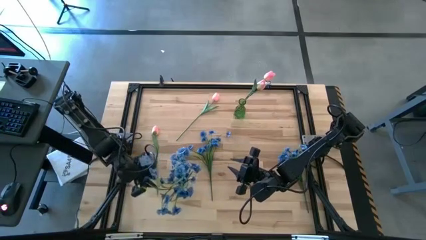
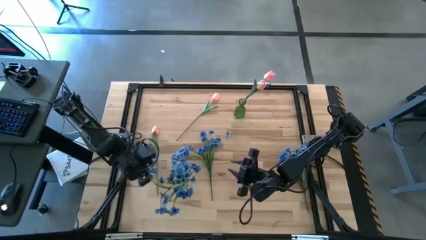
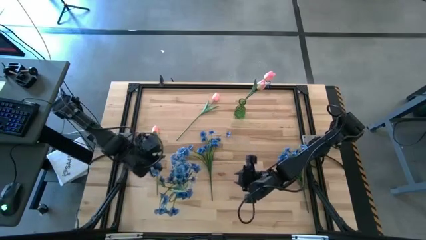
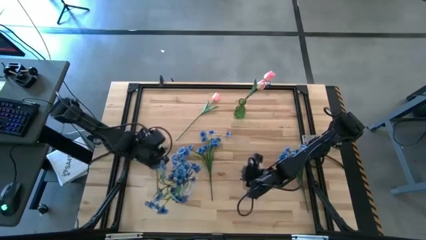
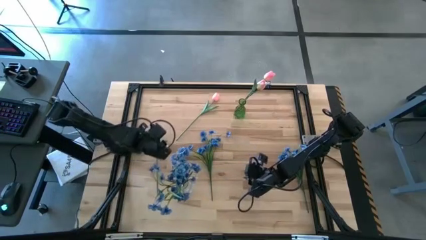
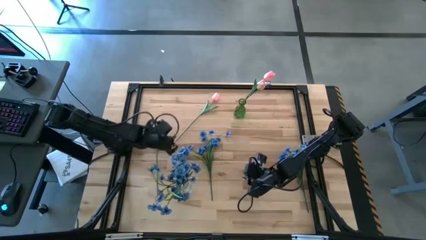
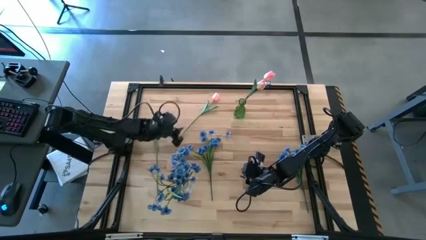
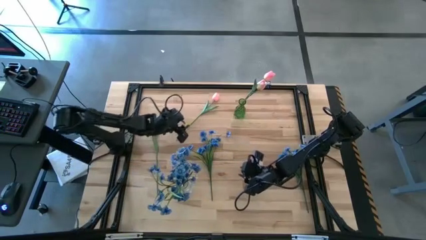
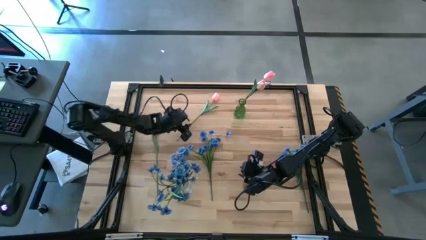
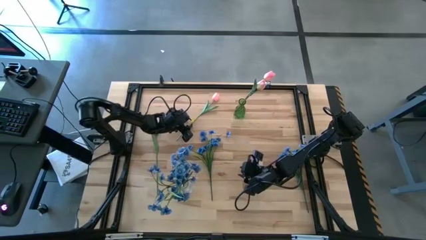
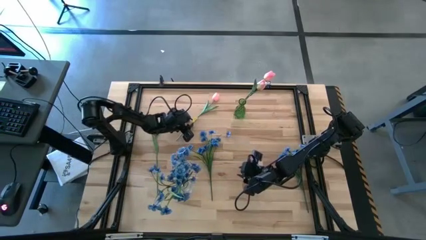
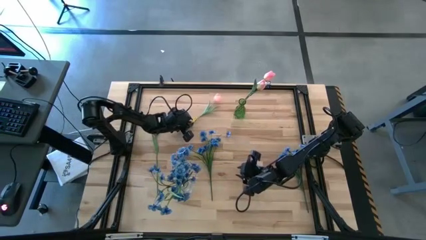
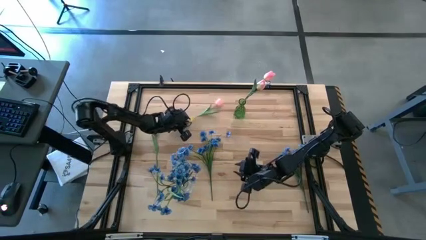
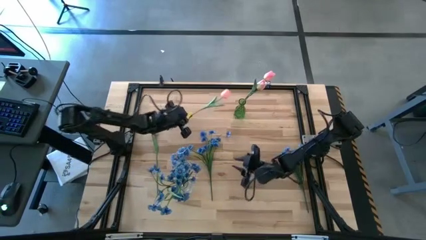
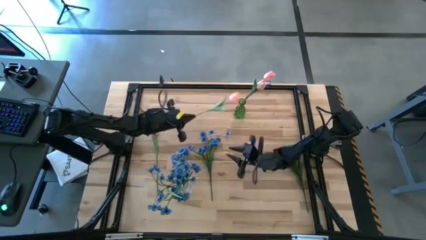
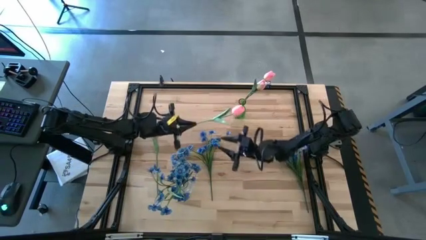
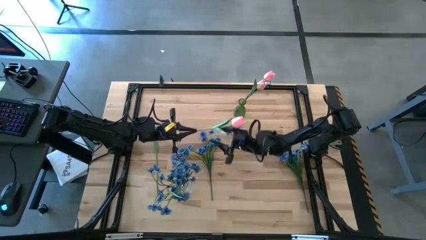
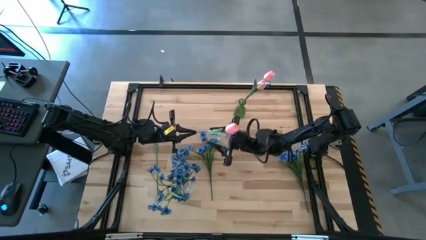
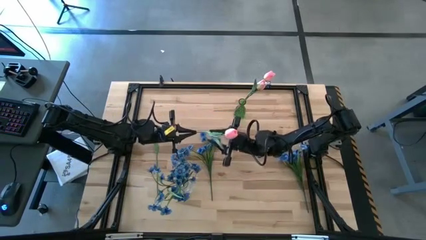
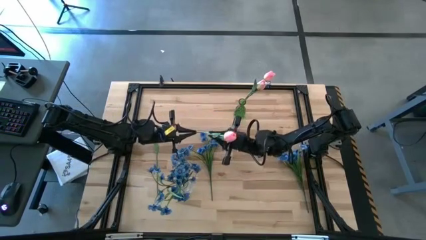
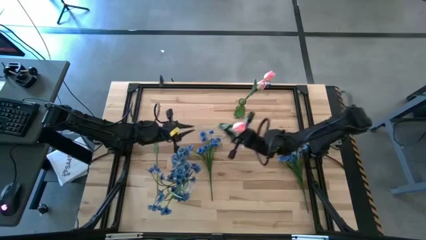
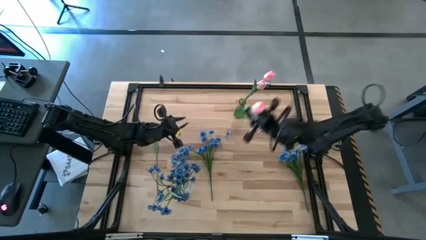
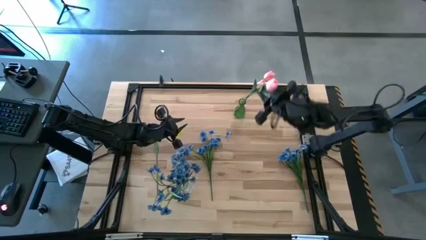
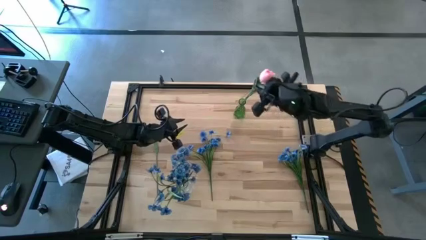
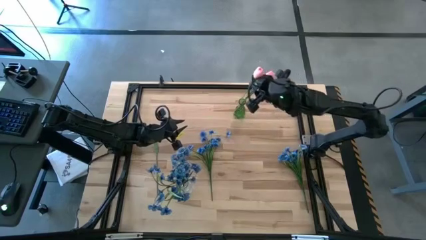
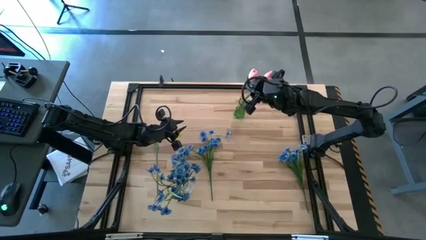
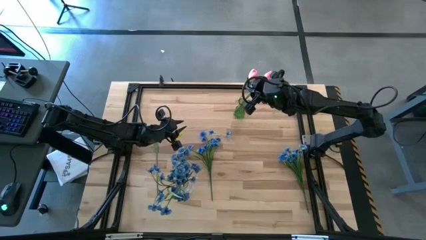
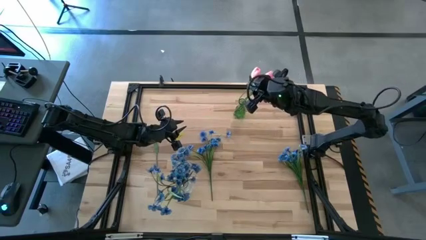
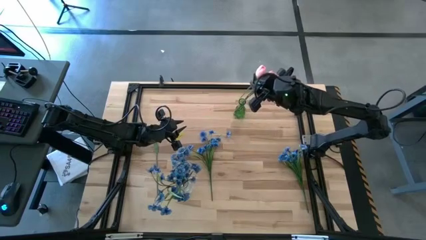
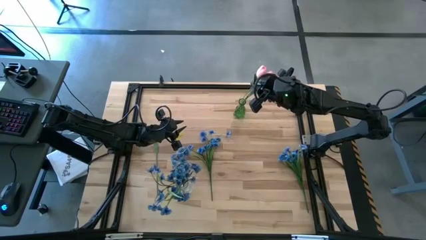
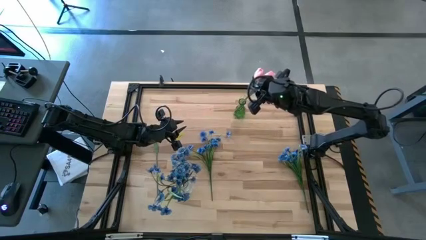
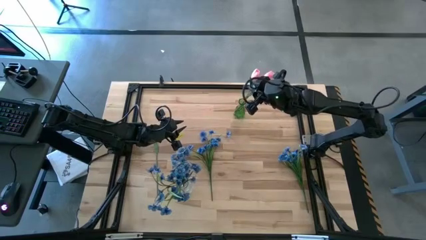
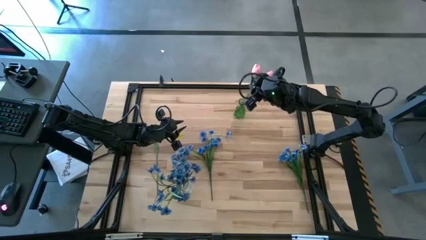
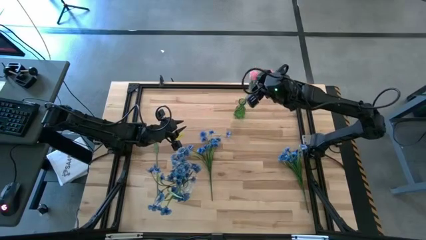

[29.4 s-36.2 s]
Task: Sort flowers into vase by color
Put the pink flower into the green vase

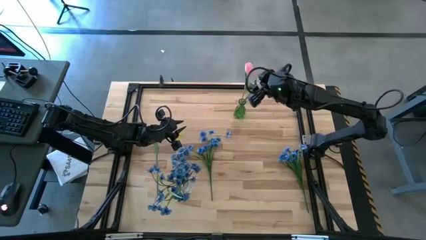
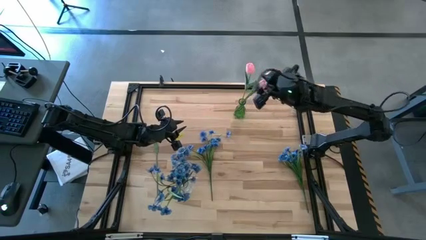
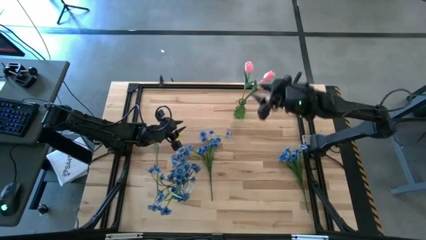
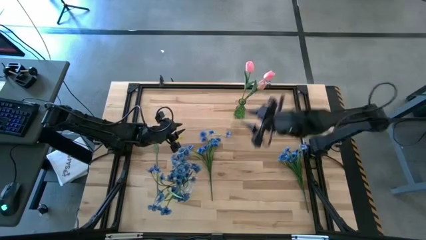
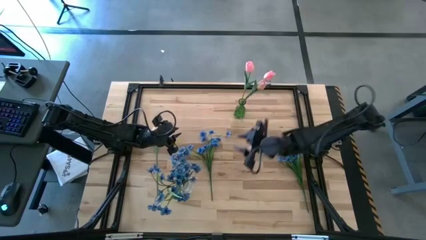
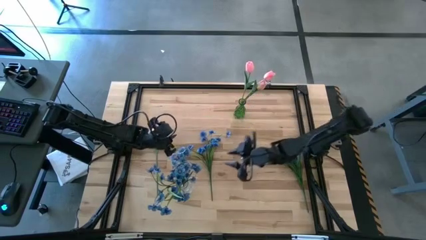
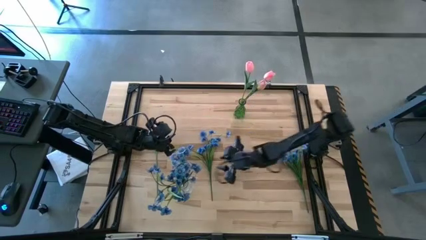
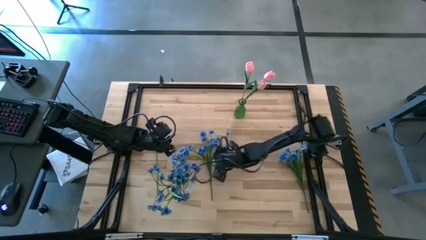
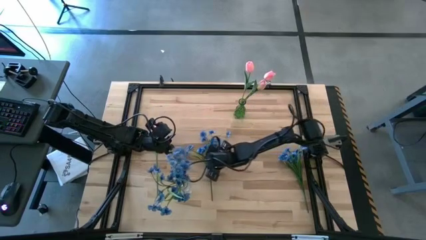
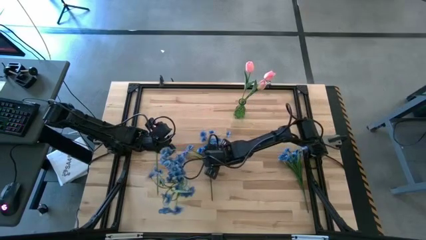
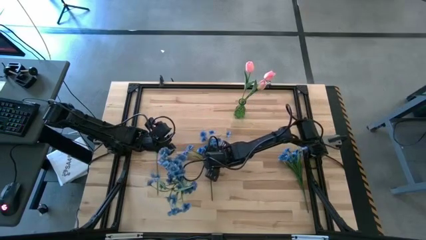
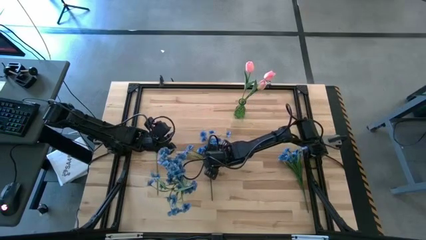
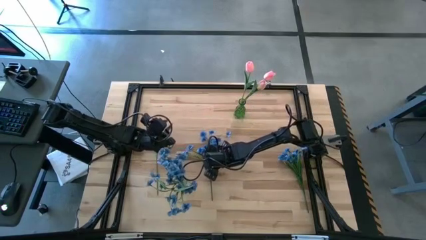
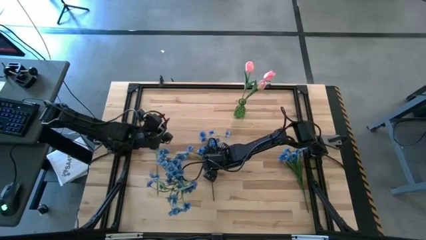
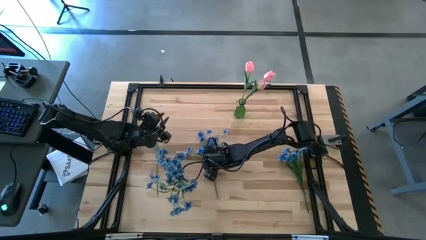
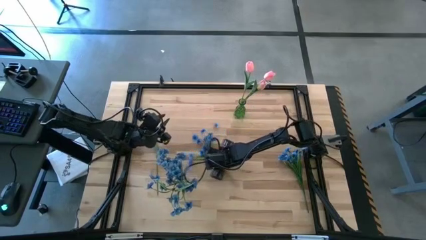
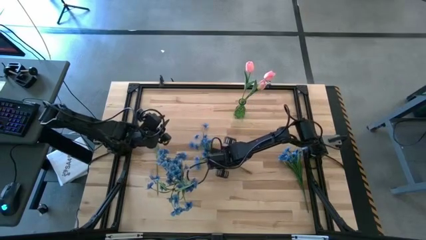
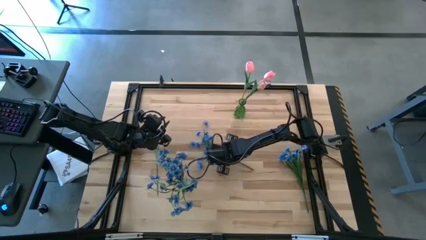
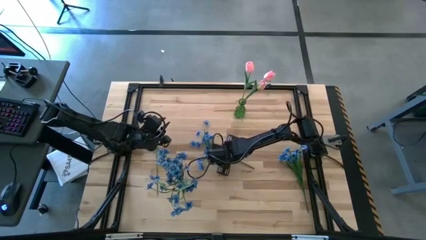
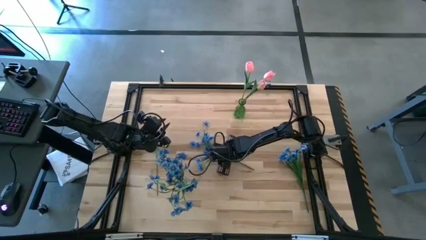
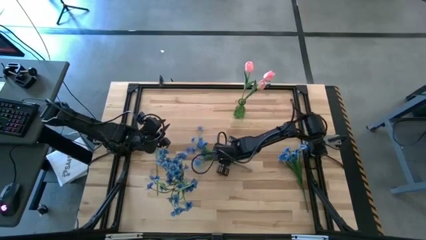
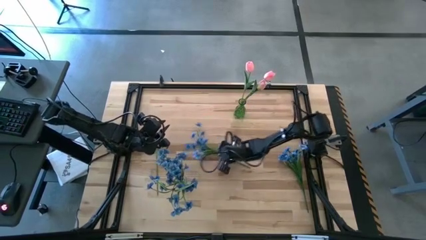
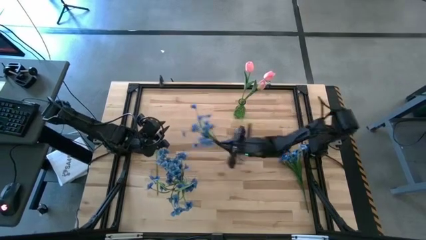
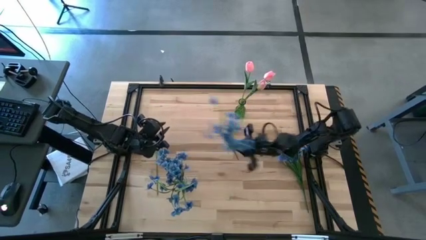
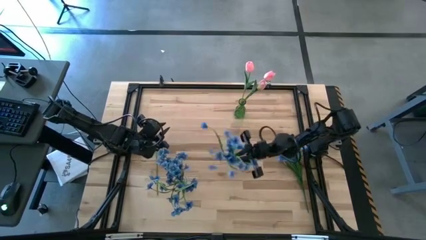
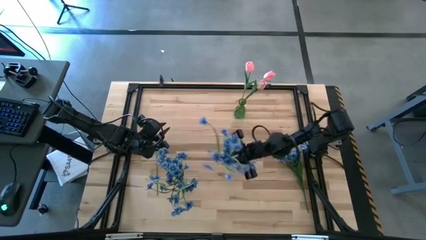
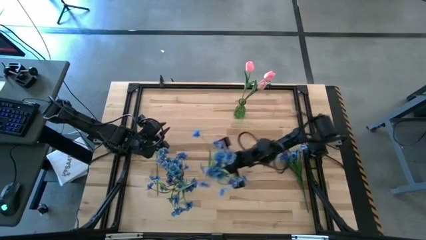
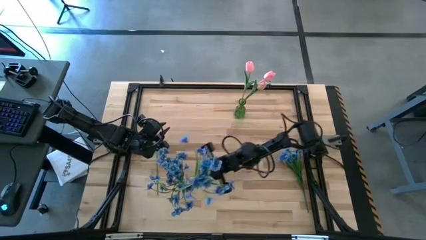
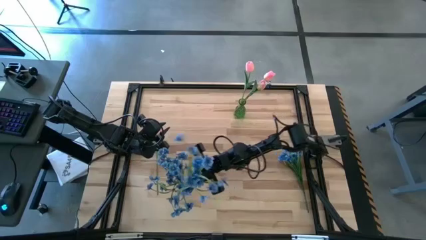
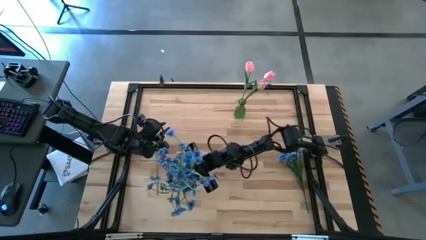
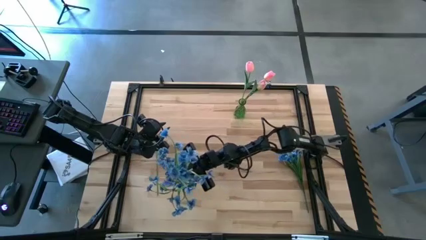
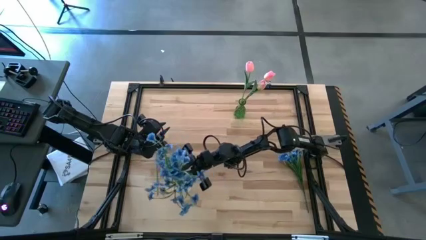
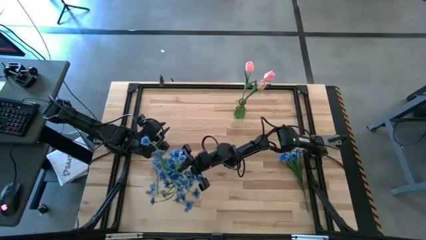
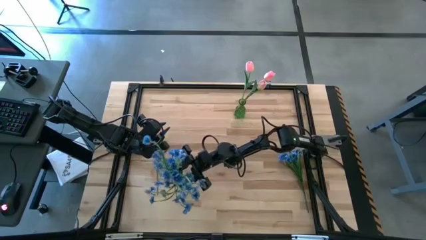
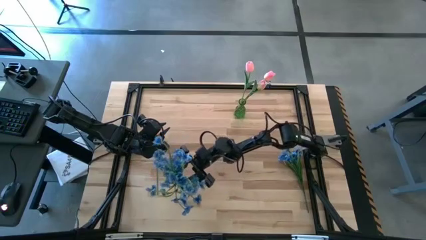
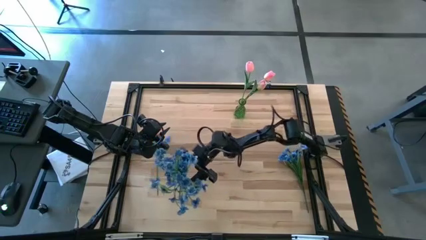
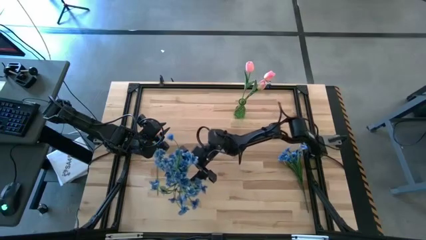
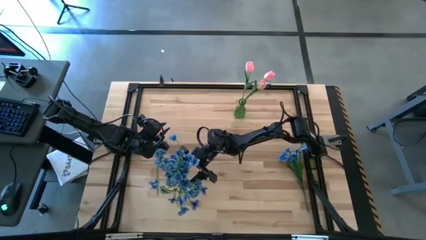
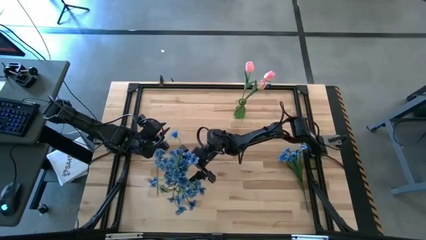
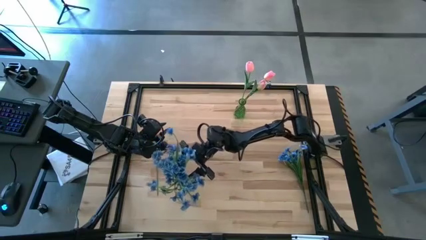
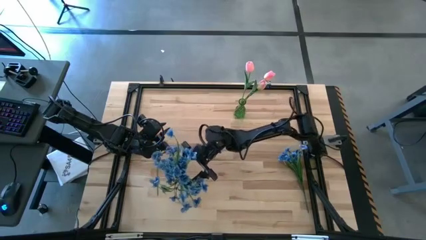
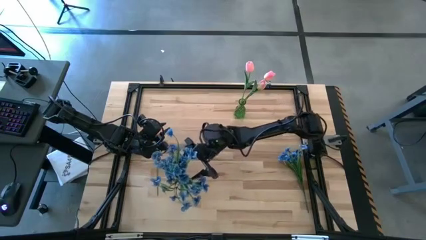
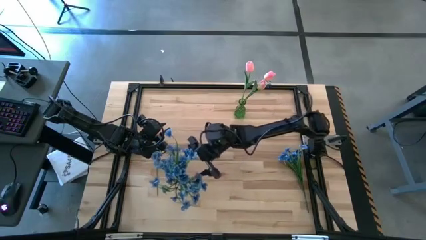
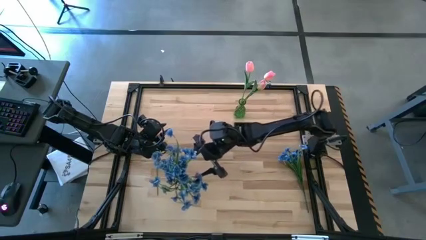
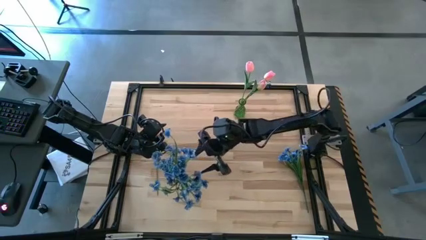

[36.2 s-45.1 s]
Put the blue flowers into the transparent vase
